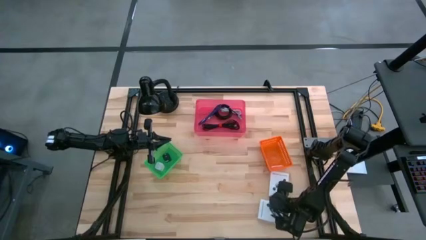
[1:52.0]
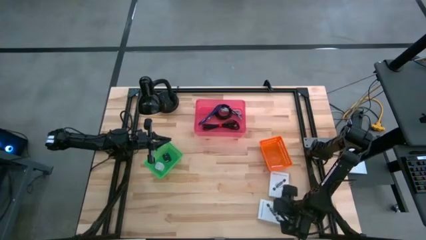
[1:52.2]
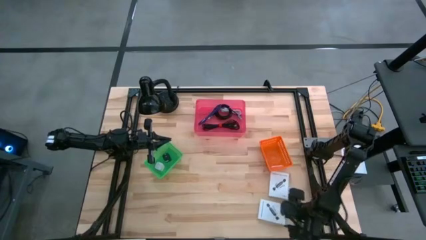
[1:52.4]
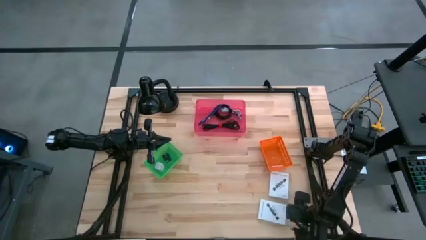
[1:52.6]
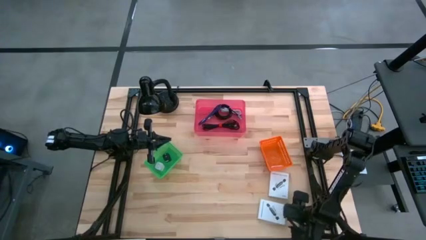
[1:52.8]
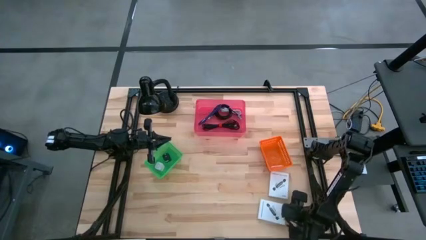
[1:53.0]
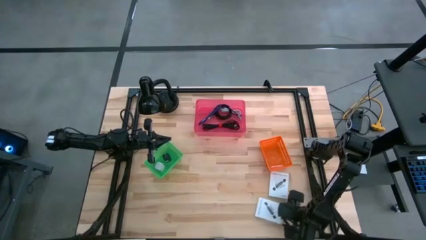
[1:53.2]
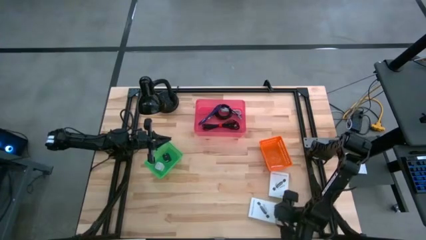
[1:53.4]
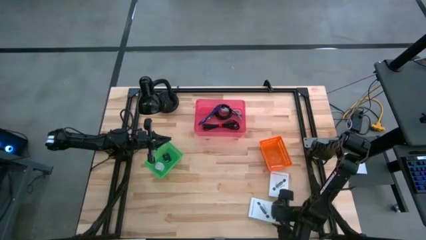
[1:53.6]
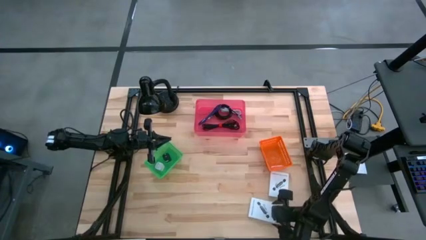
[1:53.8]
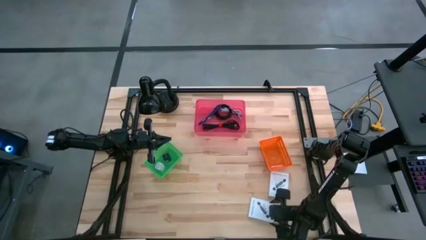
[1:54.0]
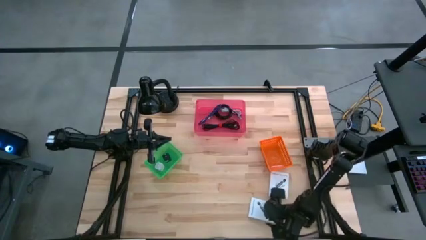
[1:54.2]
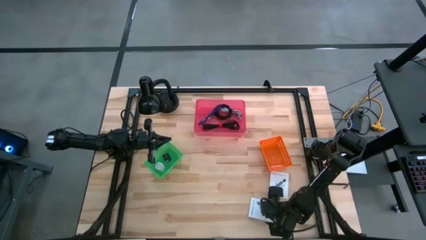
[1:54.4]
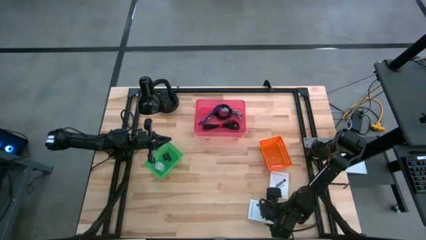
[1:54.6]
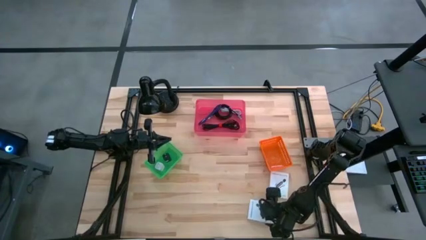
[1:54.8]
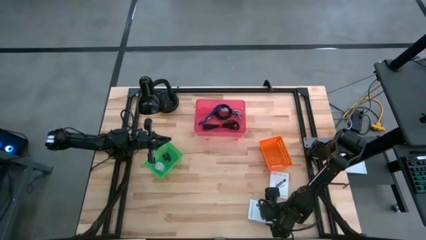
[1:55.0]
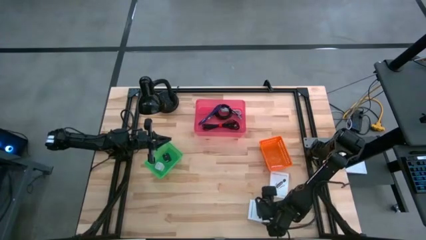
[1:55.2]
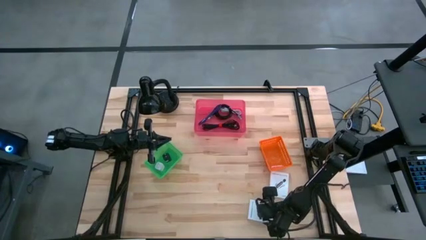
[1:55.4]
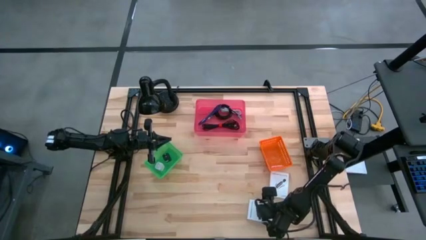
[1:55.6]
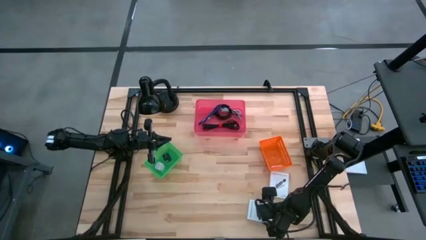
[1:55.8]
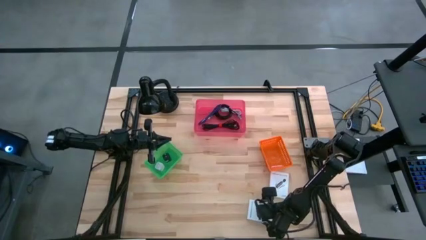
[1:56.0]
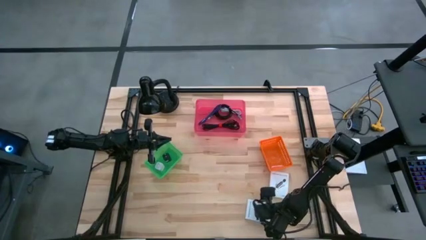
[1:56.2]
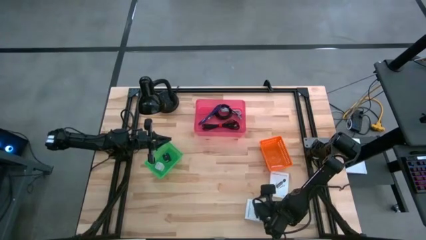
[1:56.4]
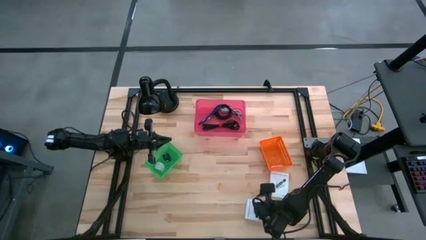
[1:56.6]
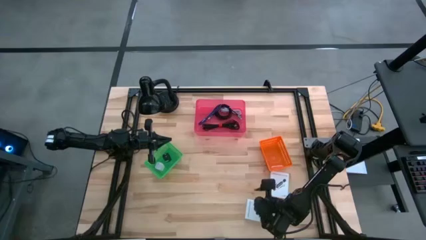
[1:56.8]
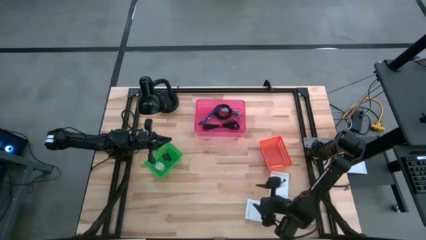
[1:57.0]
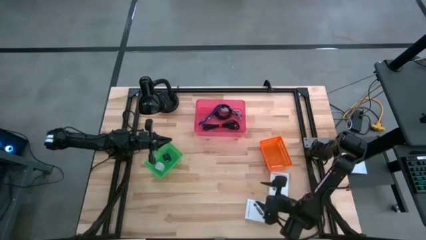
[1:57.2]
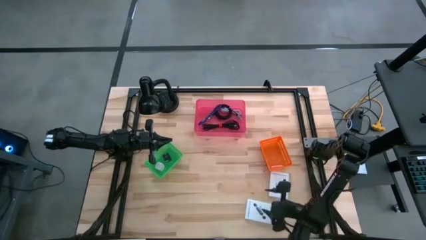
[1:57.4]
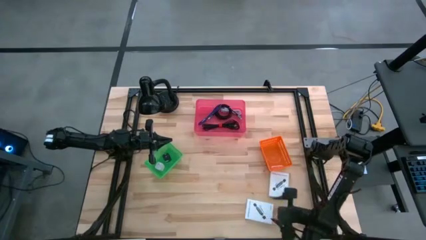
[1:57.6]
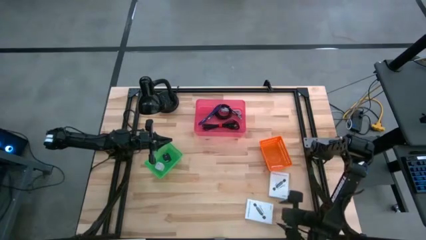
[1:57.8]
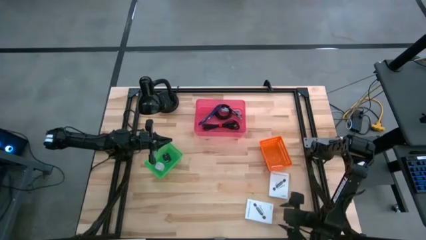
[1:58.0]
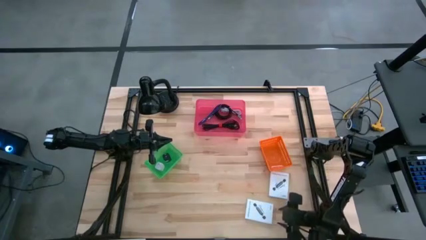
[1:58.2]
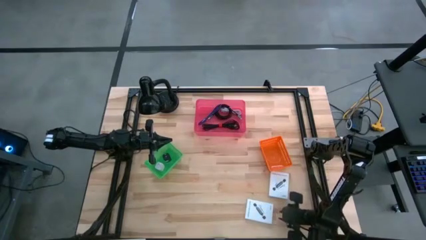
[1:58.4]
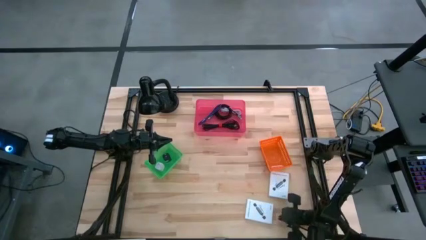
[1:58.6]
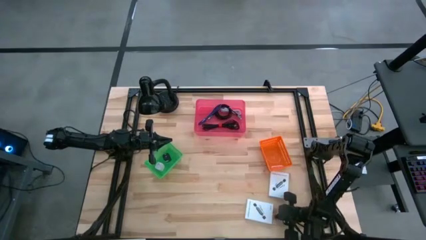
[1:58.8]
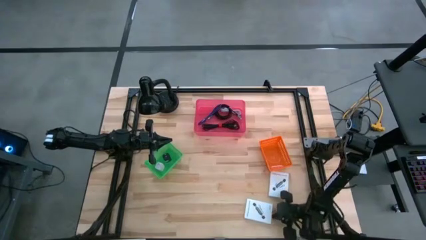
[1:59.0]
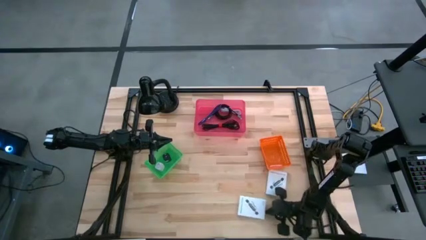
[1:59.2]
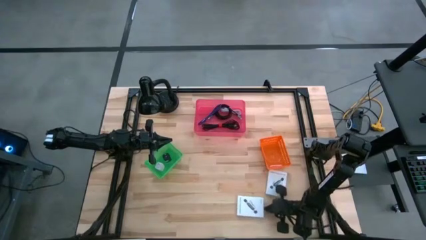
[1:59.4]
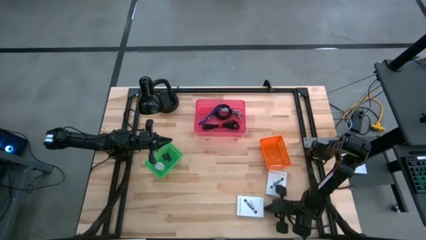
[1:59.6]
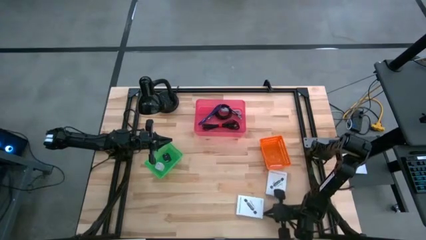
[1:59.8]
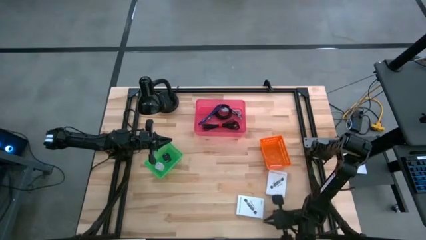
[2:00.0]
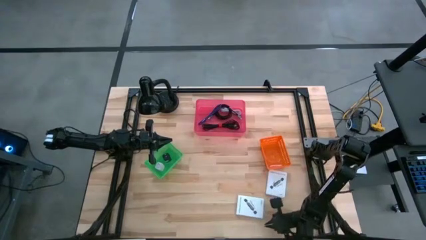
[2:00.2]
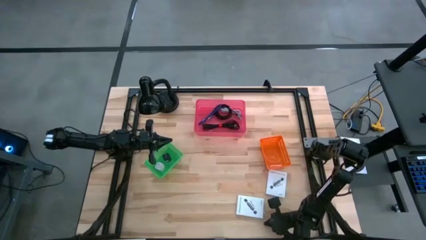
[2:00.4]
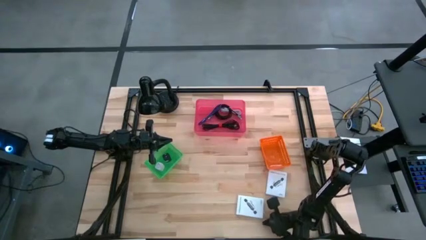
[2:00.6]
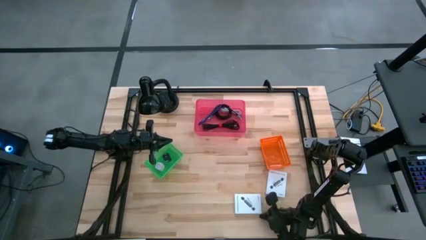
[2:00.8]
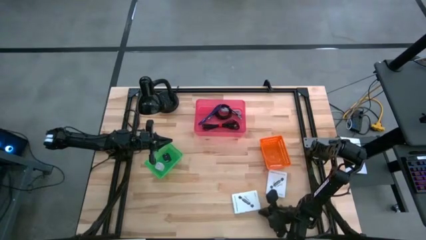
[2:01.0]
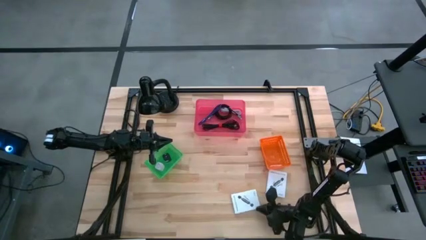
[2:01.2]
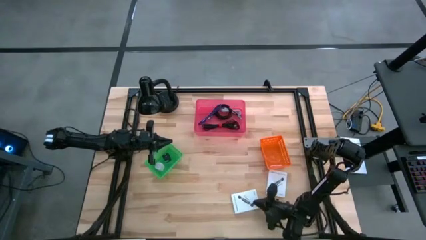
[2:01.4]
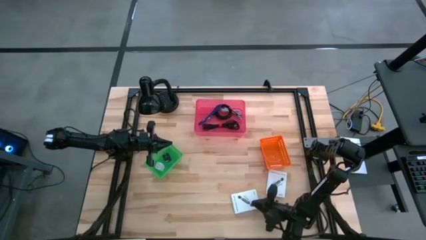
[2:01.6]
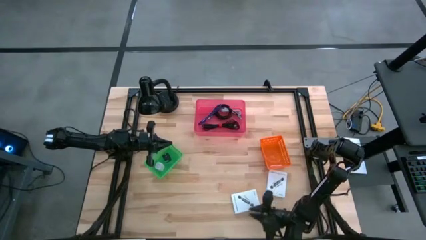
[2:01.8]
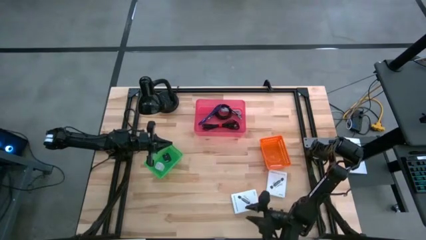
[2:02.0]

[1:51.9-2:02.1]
Task: Pick and place items into bin
Put the bottom card reader box into the orange bin
